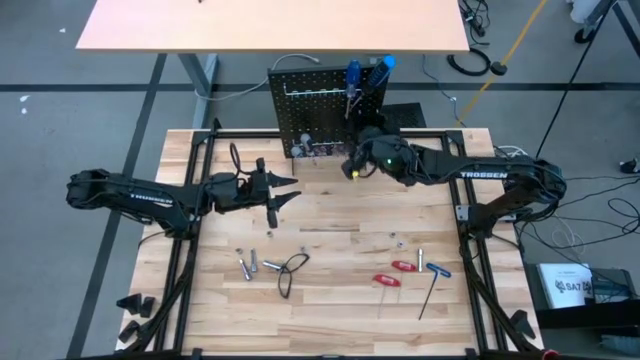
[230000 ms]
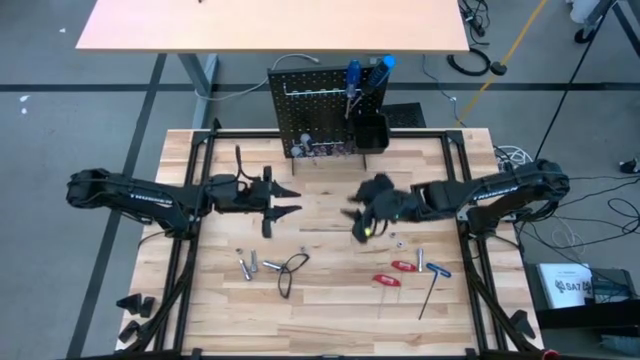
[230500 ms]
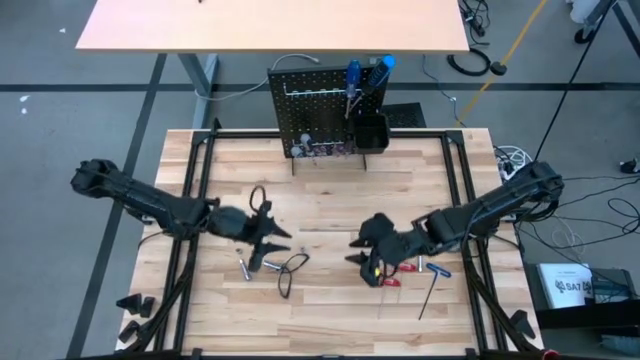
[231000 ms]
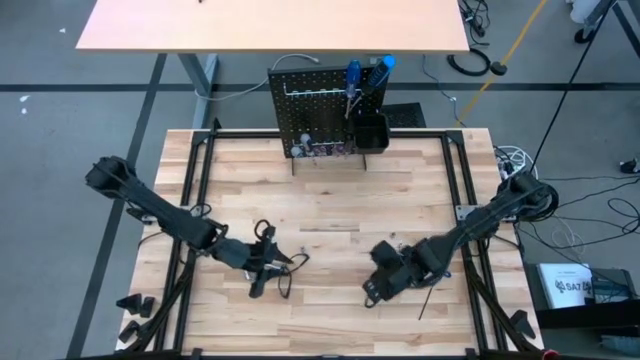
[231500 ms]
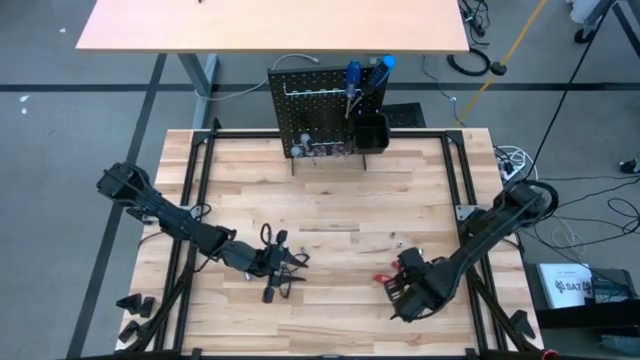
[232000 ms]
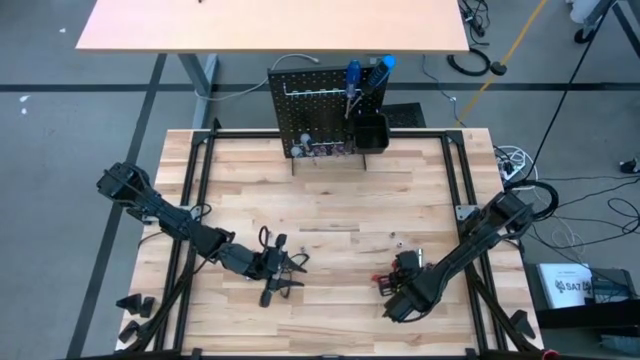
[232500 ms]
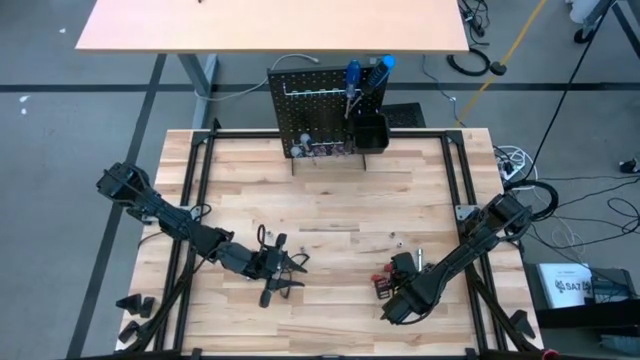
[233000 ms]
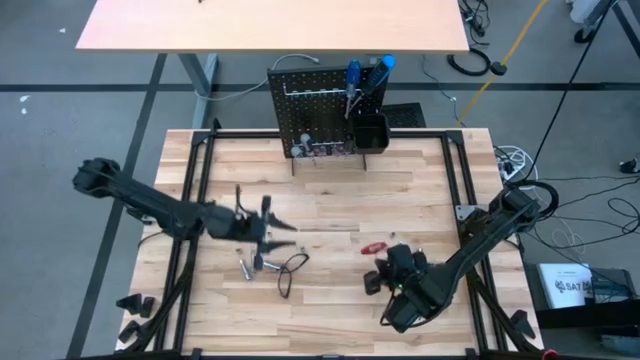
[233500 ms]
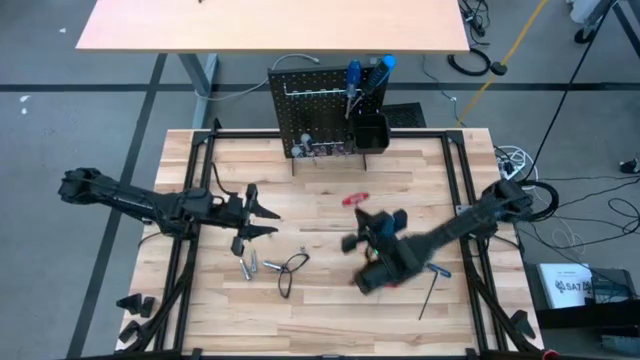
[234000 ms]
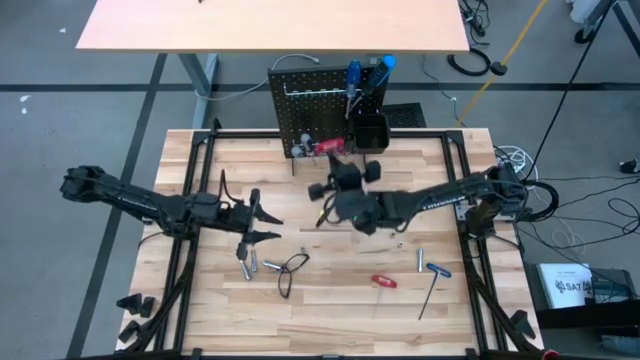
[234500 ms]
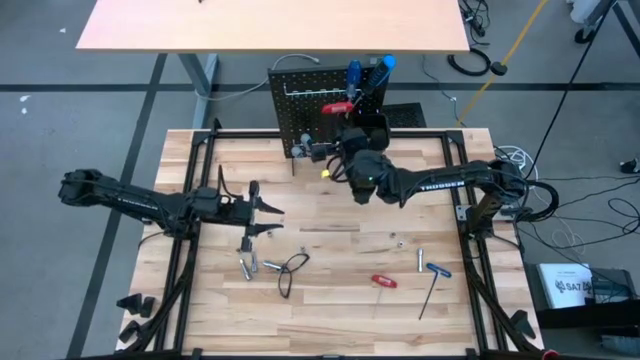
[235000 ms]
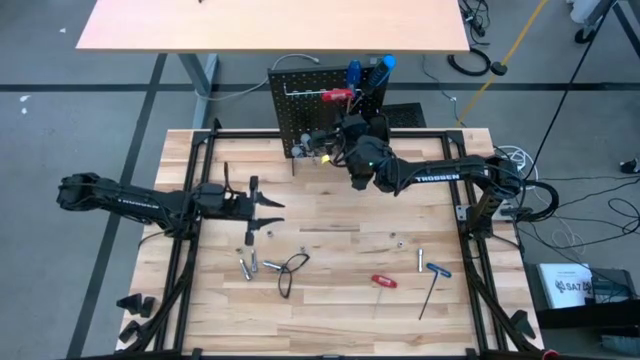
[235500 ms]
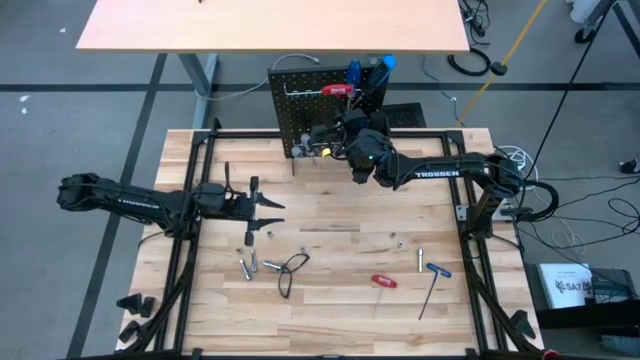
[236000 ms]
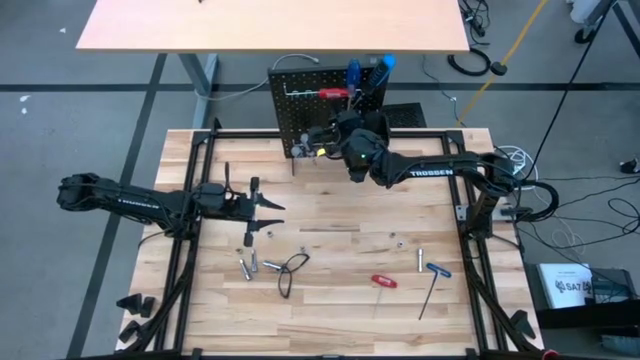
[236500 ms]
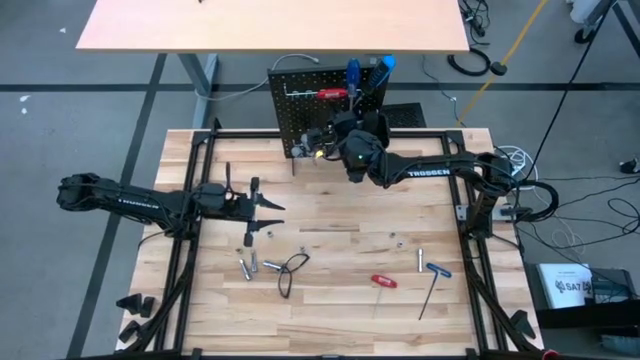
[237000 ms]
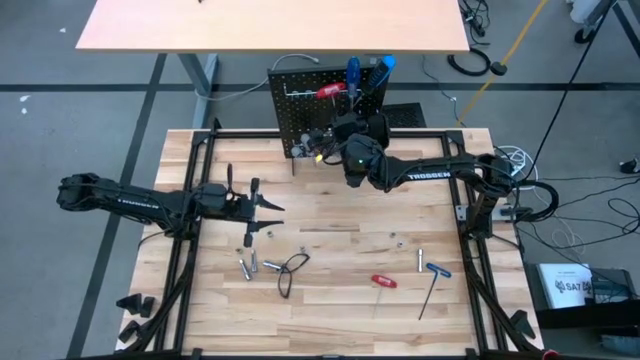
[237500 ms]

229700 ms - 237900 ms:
Task: Hang tools onto peg board
Hang the right allen wrench on the peg board

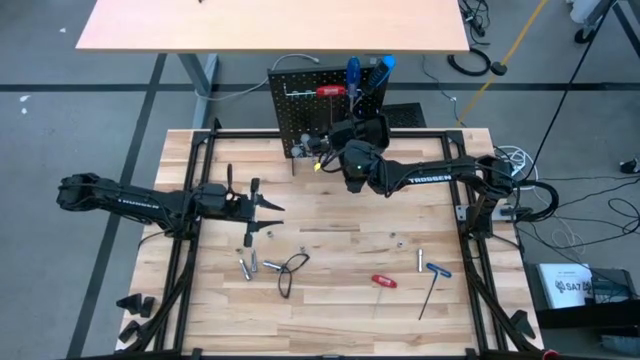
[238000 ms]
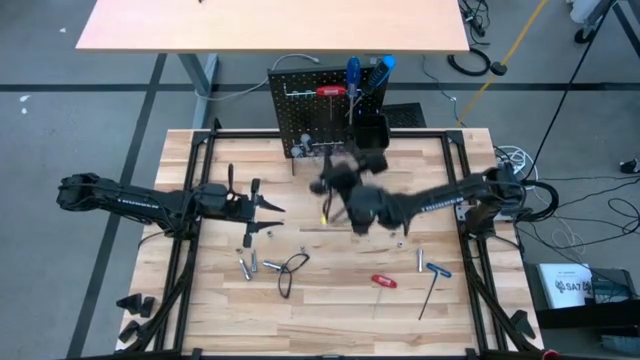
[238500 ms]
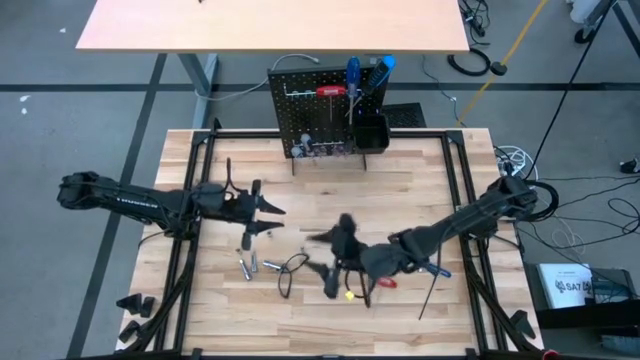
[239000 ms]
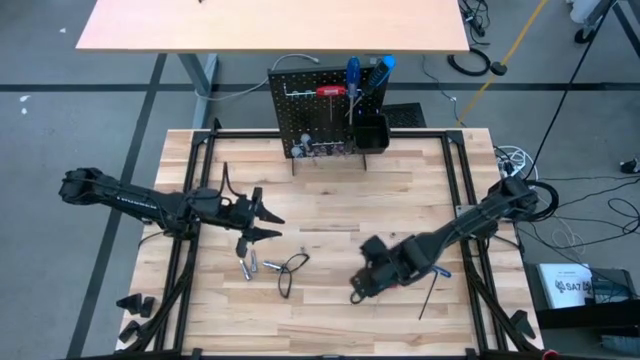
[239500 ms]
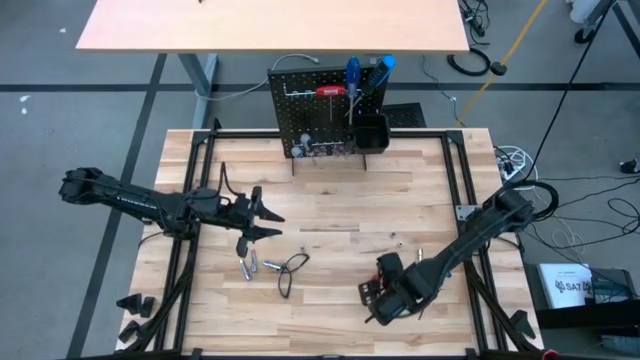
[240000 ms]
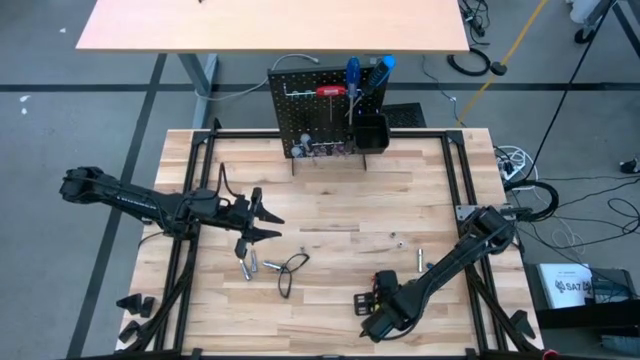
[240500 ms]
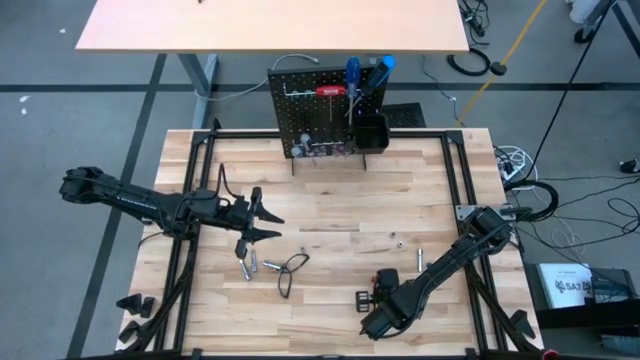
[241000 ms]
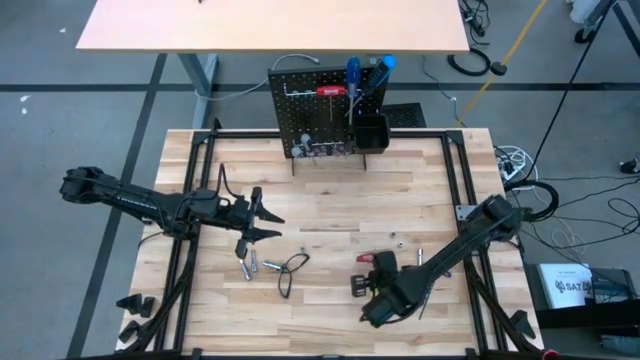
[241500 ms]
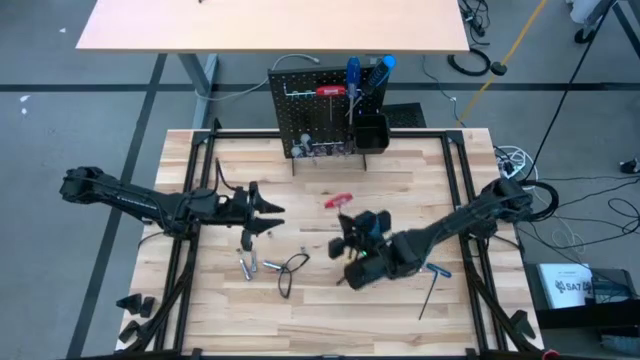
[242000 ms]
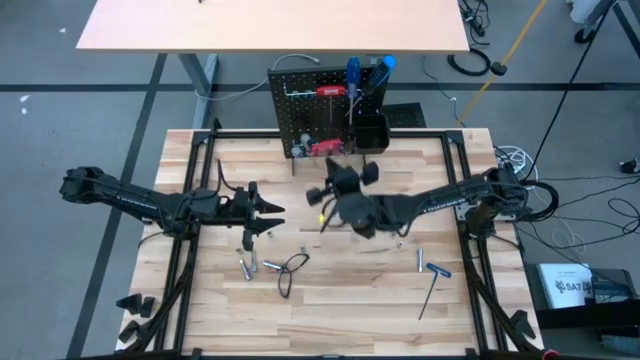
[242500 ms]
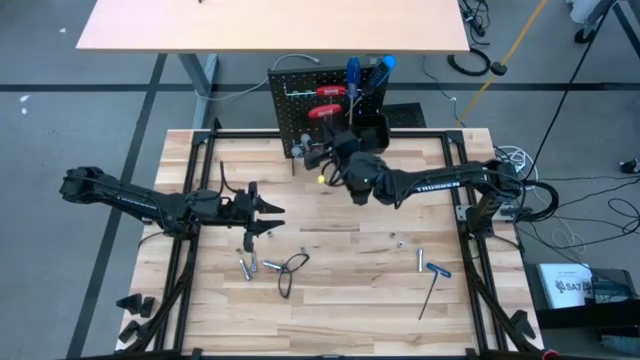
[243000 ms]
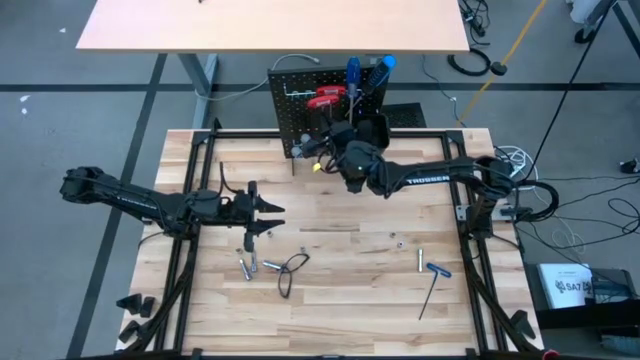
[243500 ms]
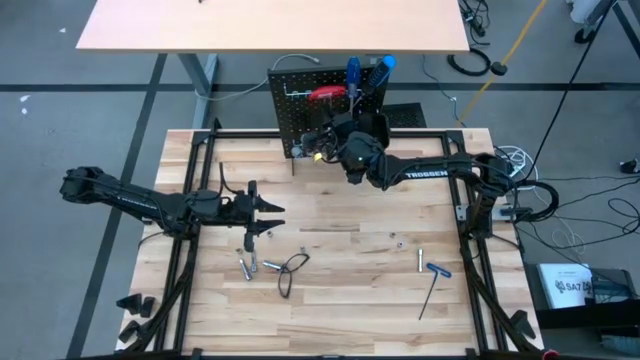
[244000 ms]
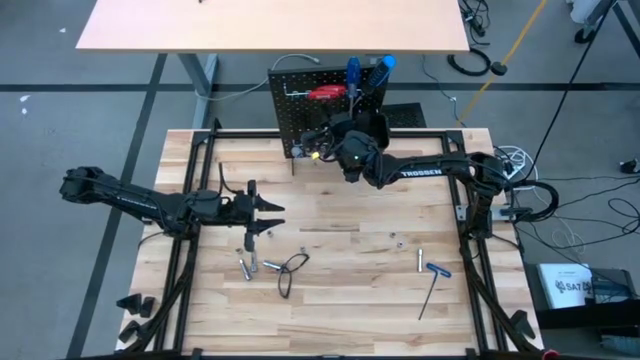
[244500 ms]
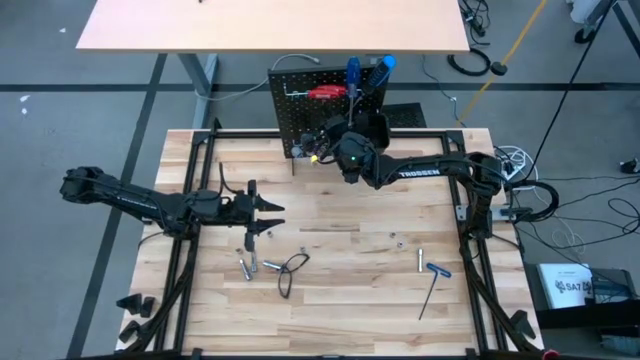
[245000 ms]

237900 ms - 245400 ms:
Hang the allen wrench on the peg board

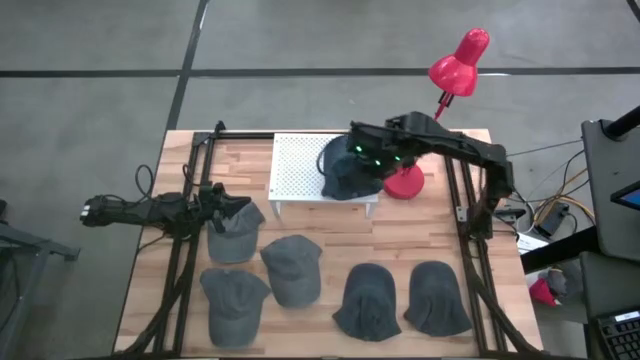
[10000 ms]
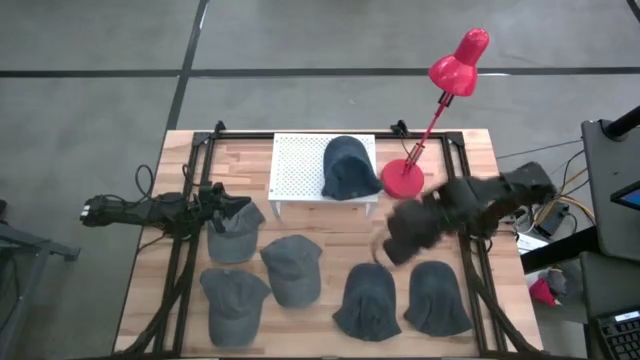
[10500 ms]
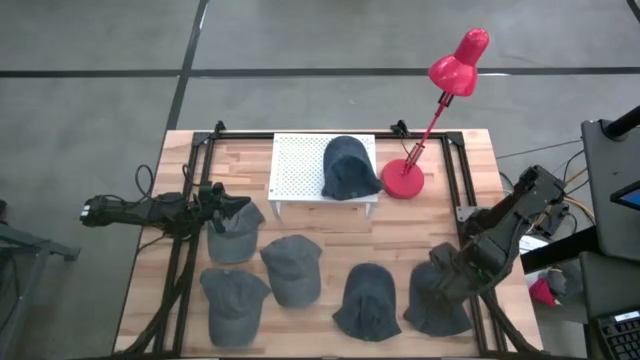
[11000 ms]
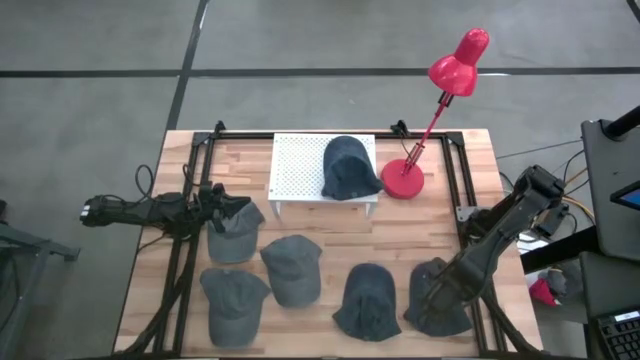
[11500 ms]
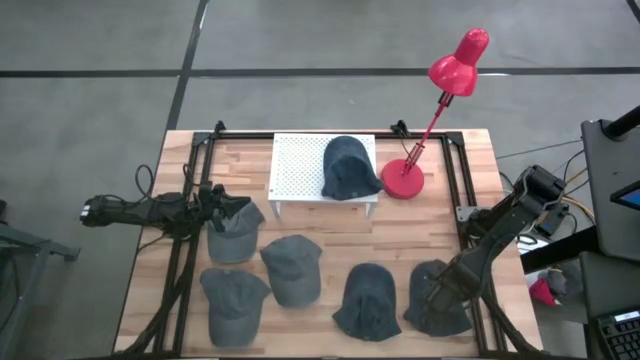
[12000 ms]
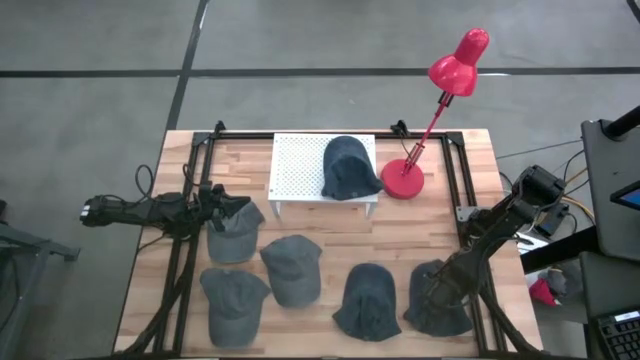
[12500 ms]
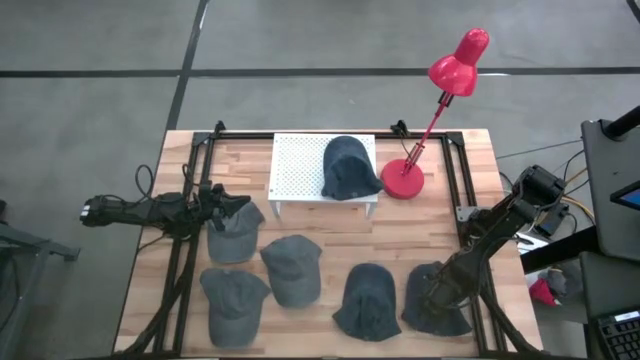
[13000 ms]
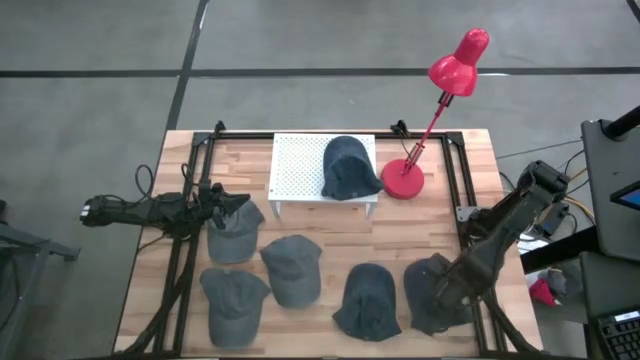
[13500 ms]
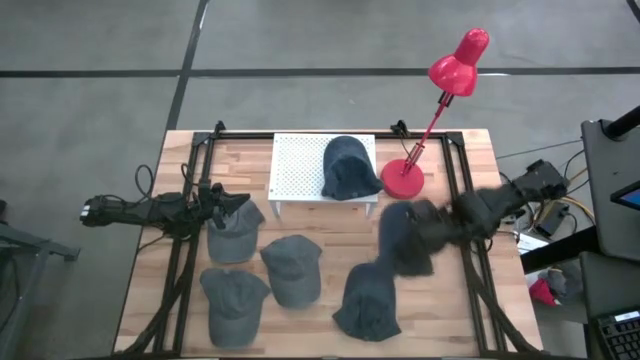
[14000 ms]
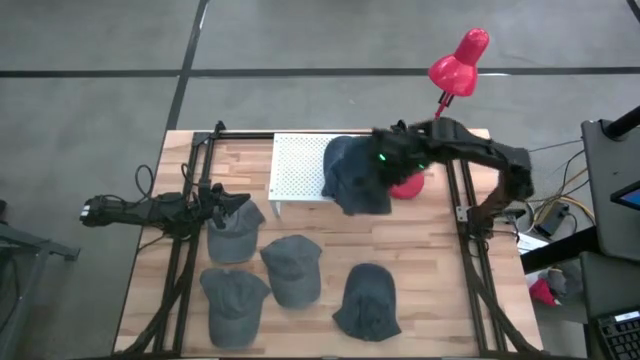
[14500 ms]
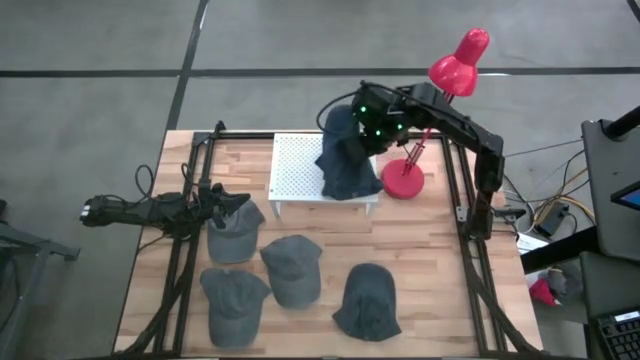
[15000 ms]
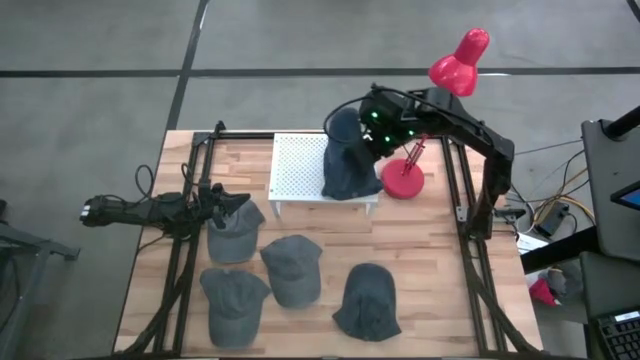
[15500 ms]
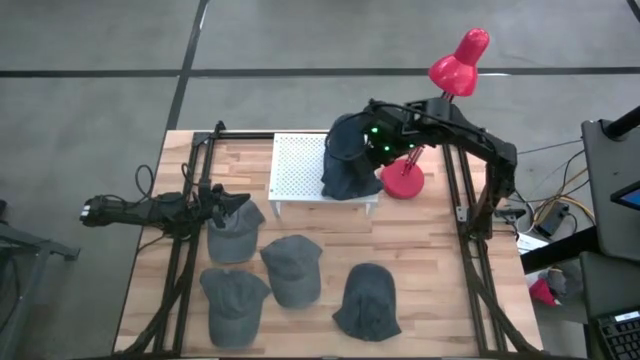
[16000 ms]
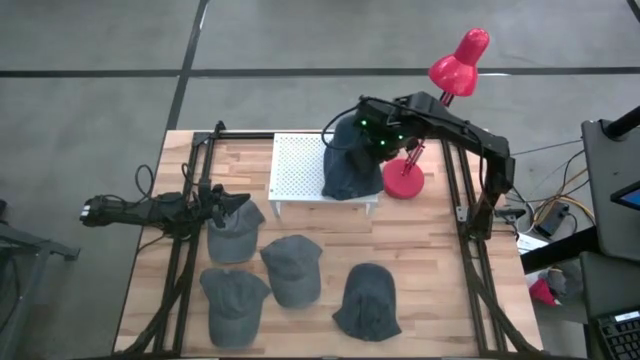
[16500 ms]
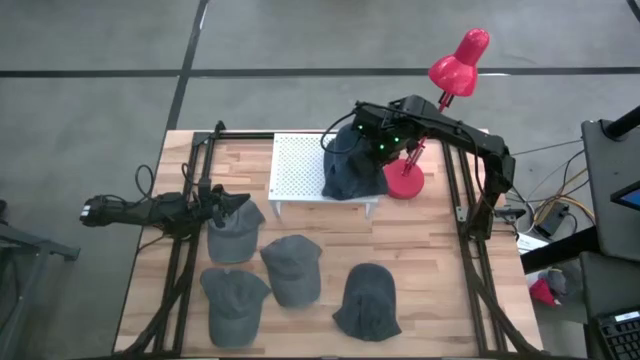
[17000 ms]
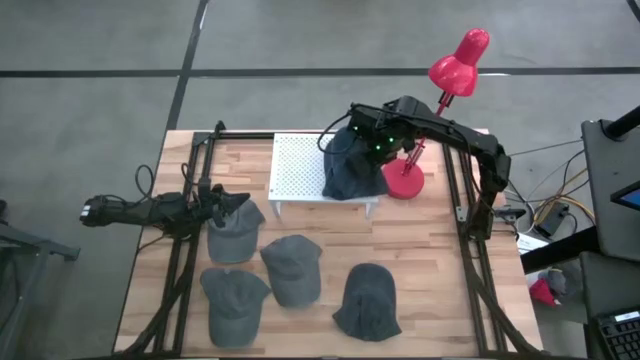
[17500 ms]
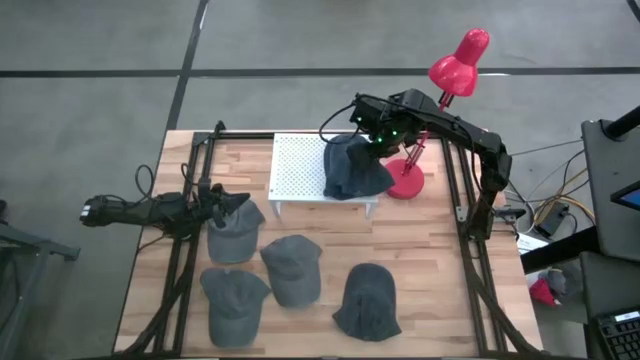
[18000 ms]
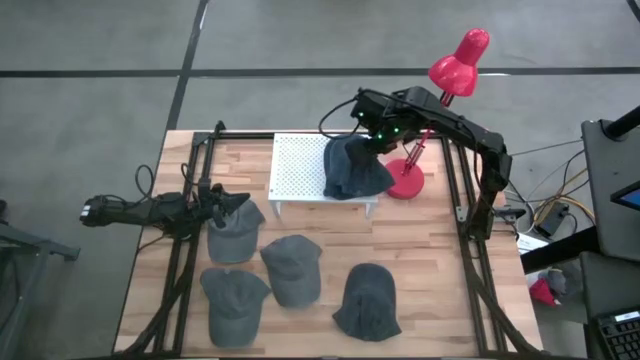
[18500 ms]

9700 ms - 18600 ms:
Task: Pick & Place hat
Stack the right blue cap on the other blue cap on the shelf
